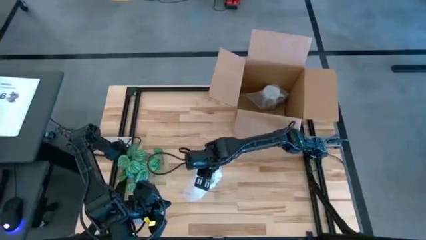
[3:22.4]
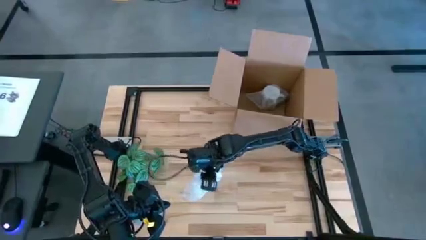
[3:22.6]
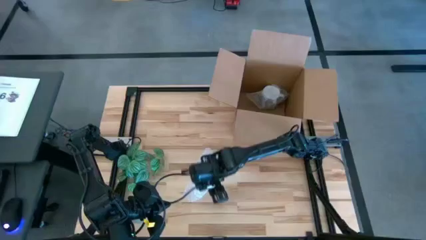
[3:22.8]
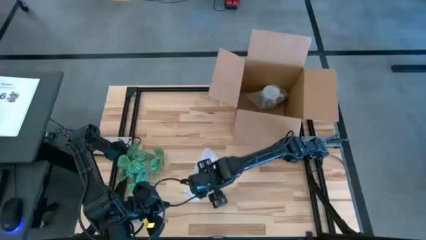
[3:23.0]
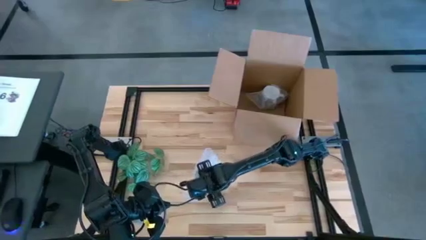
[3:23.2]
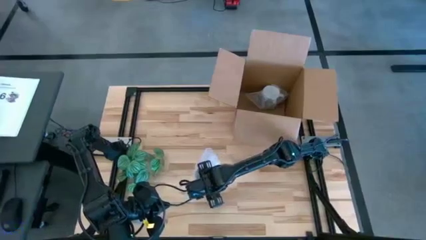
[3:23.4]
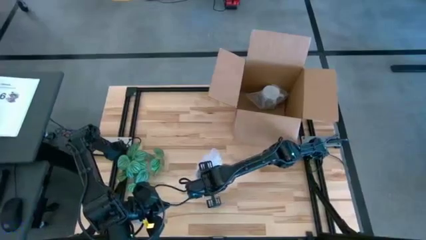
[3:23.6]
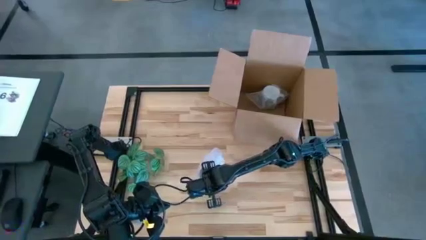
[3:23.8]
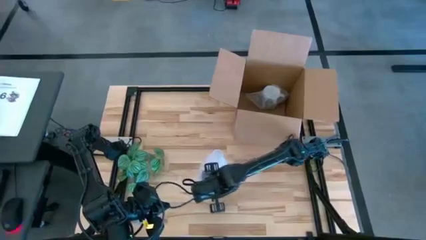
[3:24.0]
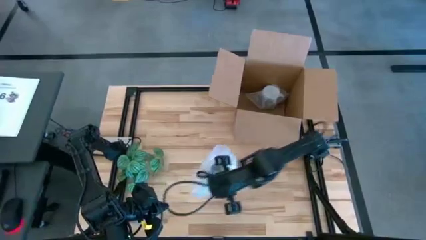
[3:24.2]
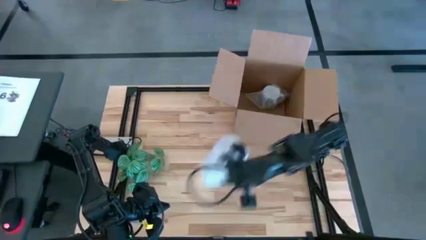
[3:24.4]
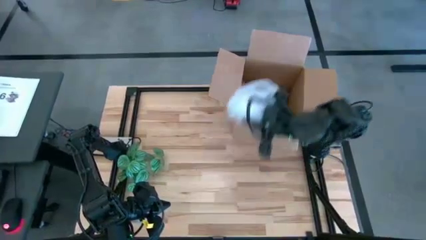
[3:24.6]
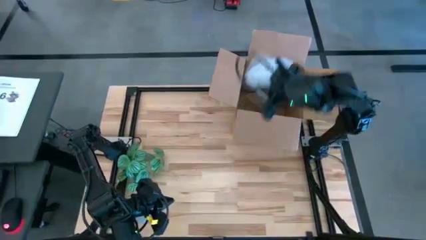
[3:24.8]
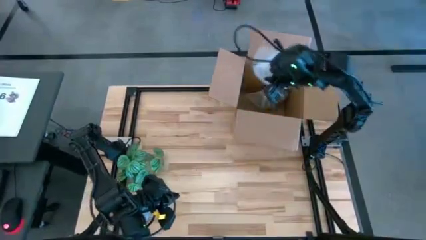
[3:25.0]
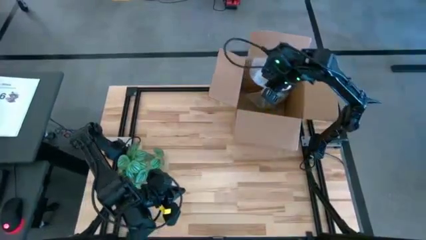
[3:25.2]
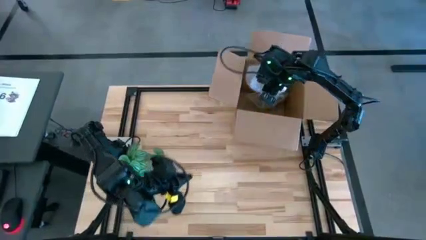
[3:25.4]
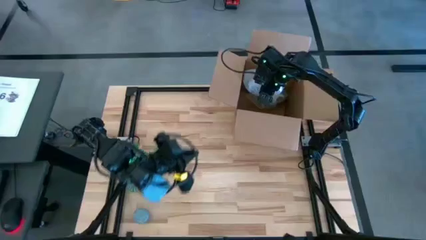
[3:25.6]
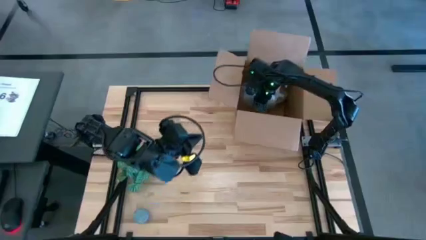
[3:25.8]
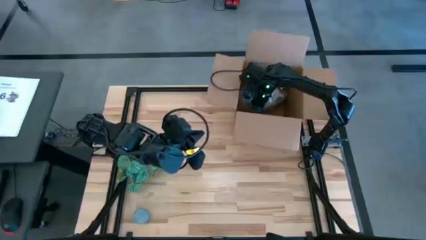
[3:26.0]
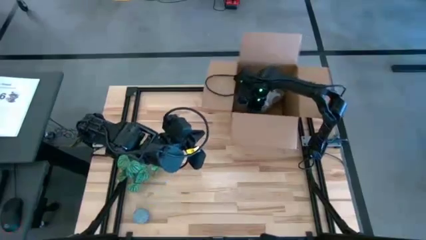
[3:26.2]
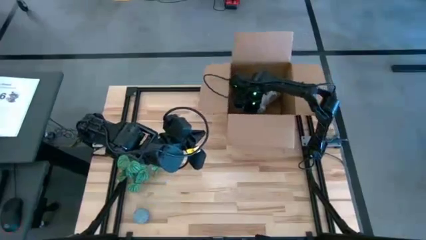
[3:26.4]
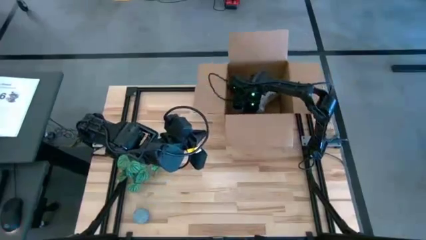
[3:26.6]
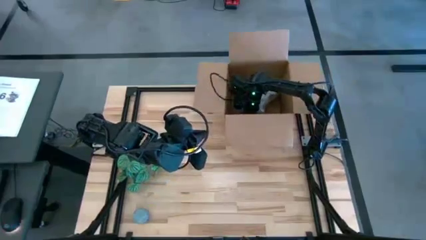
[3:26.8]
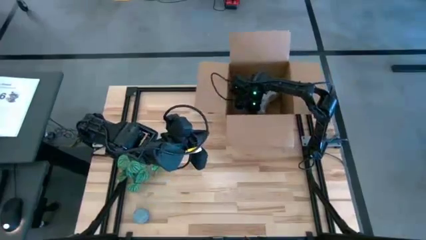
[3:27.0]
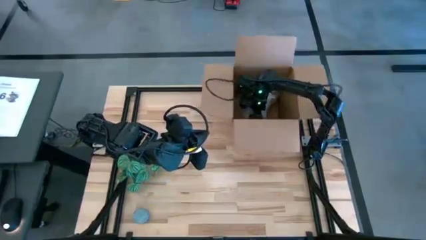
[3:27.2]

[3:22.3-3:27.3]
Task: wrap mug
Put the wrapped blue mug into the cardboard box

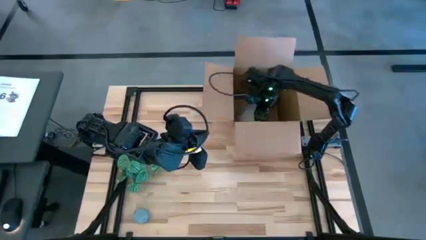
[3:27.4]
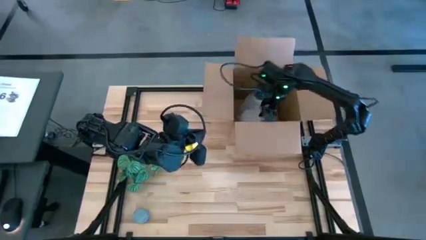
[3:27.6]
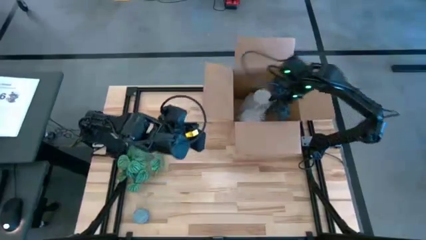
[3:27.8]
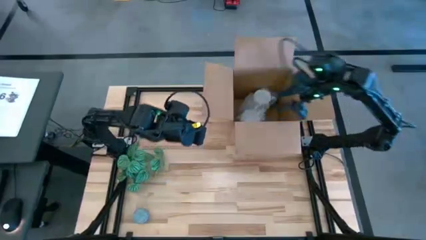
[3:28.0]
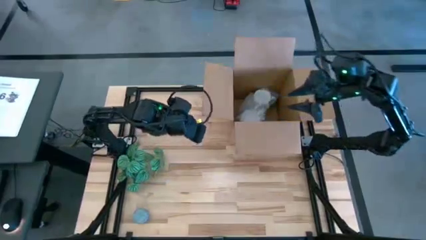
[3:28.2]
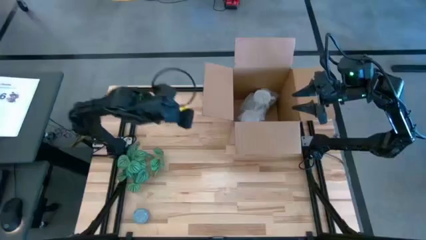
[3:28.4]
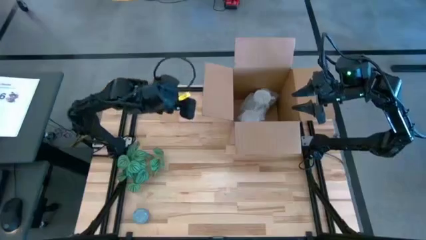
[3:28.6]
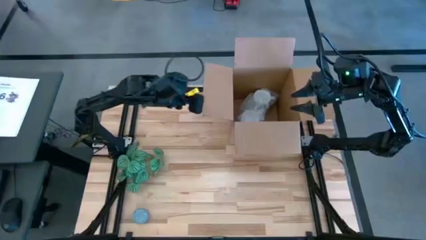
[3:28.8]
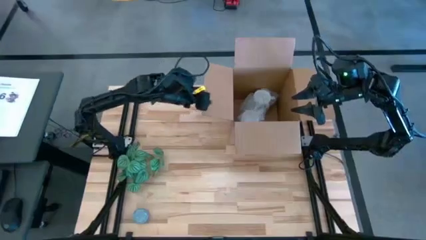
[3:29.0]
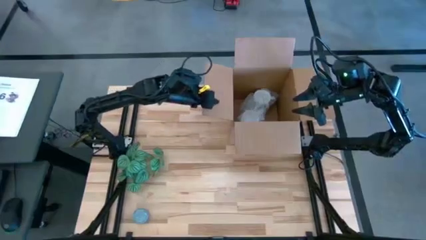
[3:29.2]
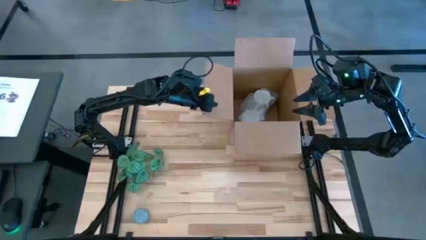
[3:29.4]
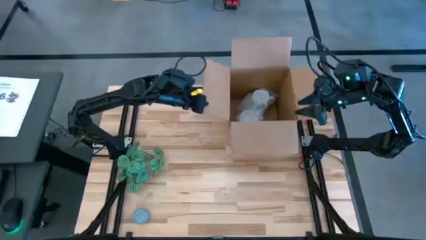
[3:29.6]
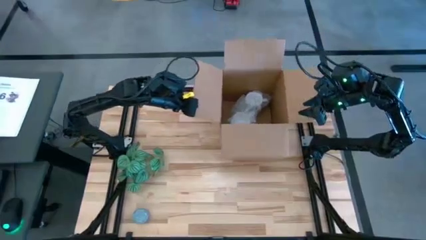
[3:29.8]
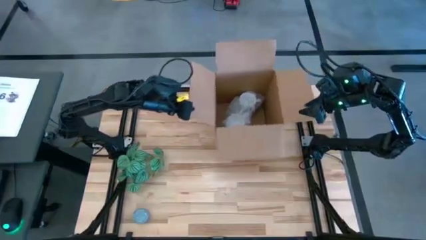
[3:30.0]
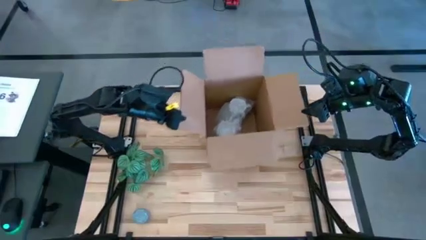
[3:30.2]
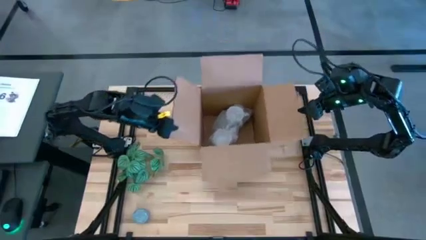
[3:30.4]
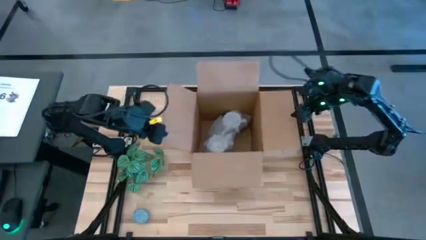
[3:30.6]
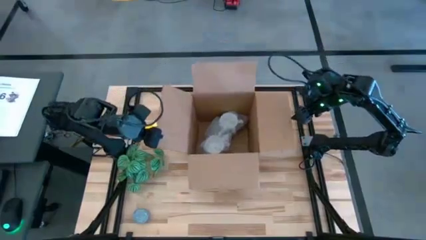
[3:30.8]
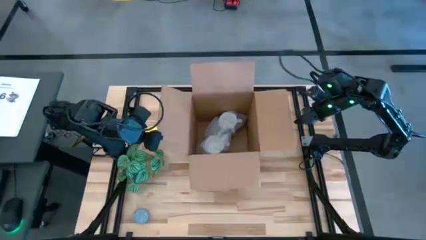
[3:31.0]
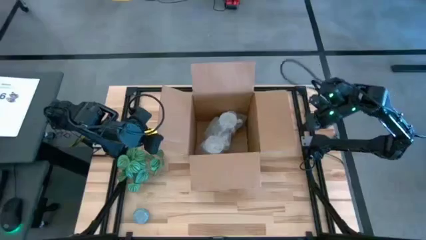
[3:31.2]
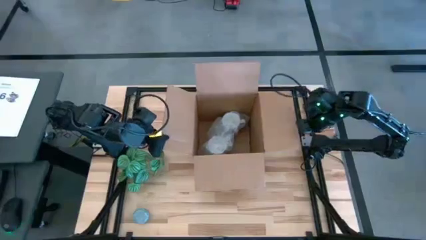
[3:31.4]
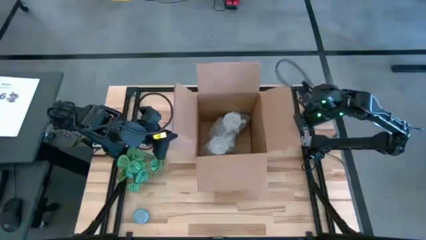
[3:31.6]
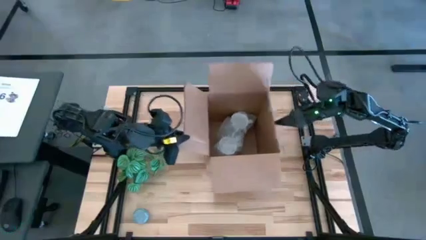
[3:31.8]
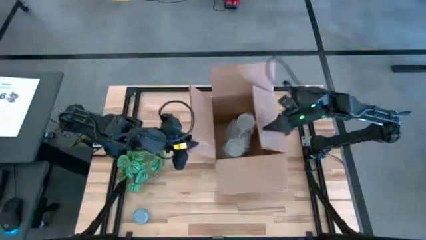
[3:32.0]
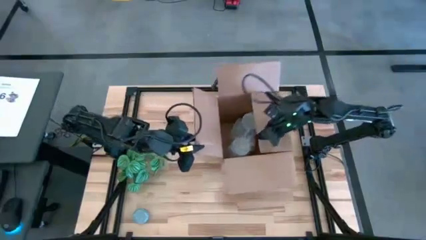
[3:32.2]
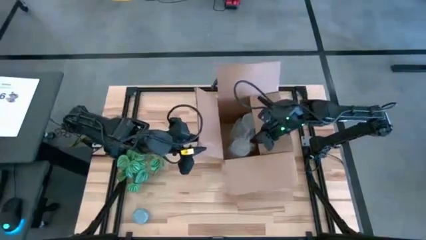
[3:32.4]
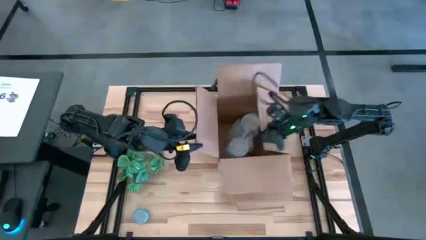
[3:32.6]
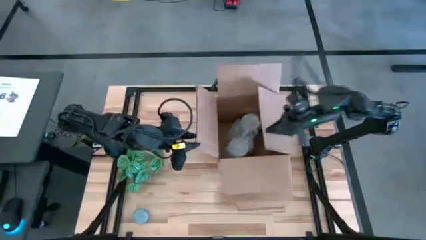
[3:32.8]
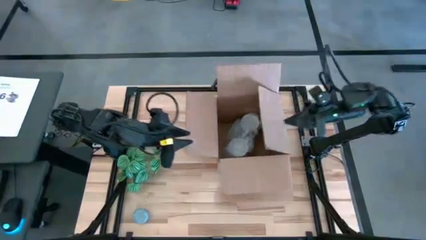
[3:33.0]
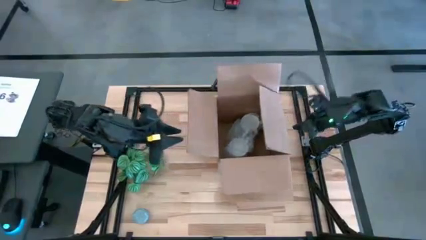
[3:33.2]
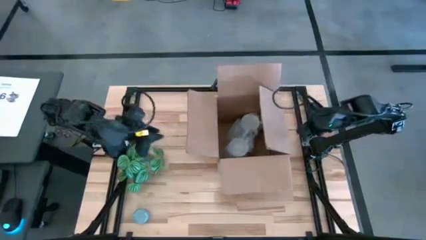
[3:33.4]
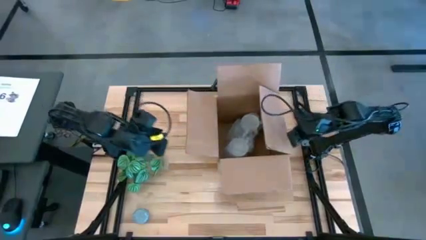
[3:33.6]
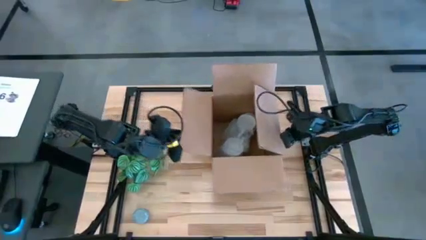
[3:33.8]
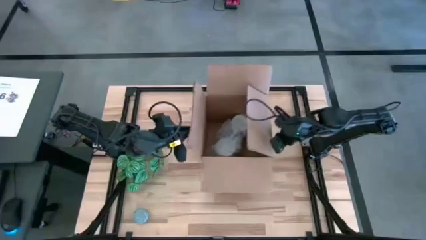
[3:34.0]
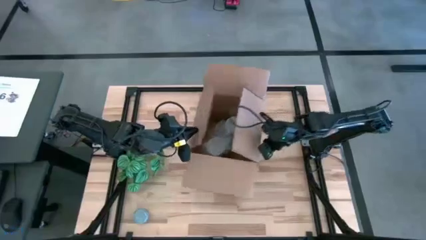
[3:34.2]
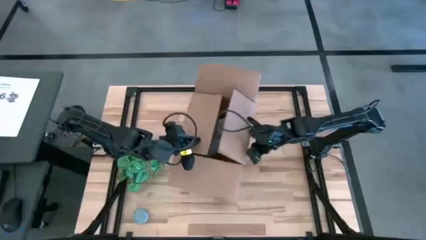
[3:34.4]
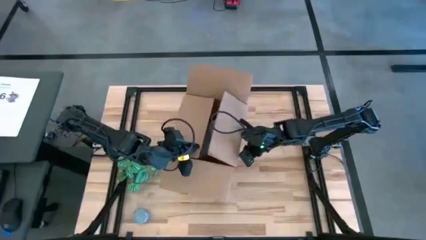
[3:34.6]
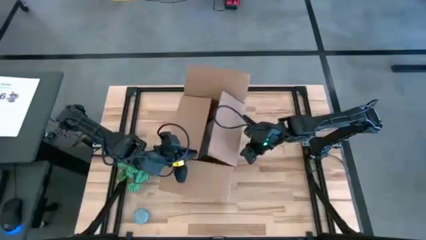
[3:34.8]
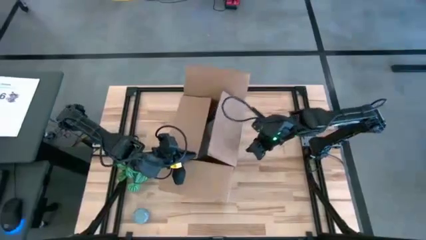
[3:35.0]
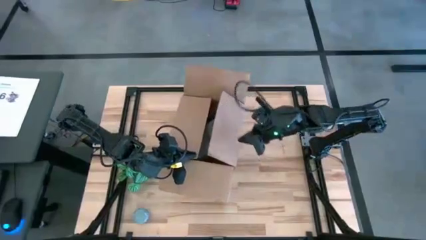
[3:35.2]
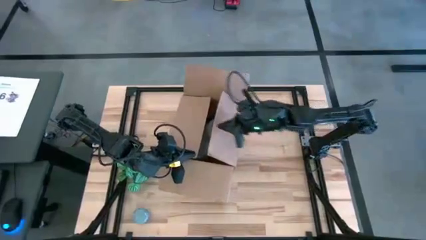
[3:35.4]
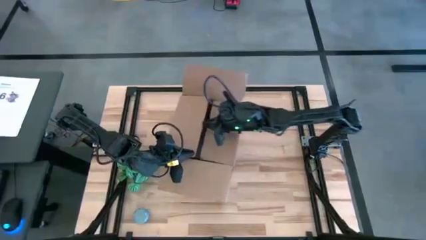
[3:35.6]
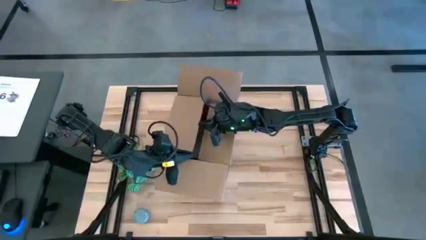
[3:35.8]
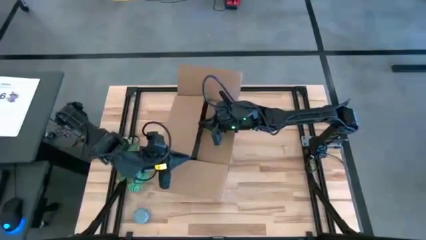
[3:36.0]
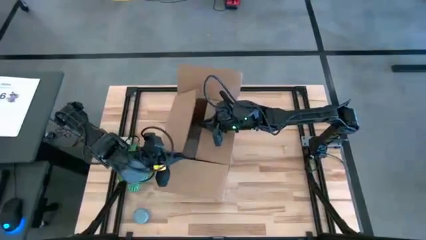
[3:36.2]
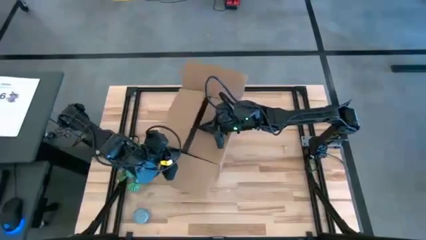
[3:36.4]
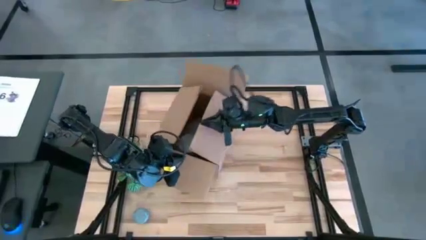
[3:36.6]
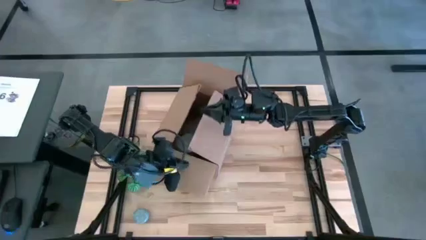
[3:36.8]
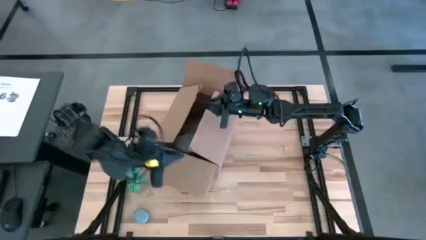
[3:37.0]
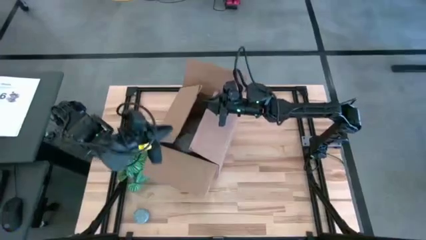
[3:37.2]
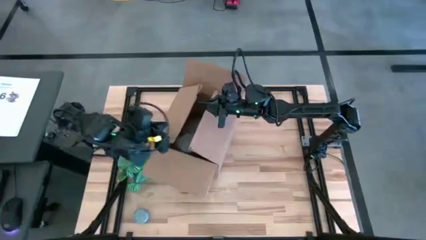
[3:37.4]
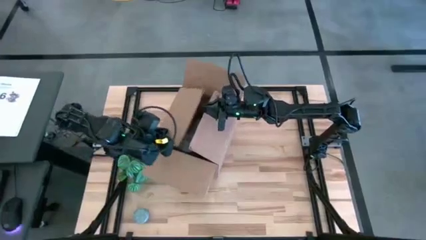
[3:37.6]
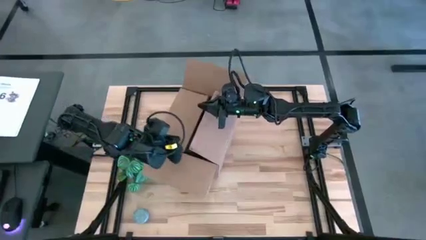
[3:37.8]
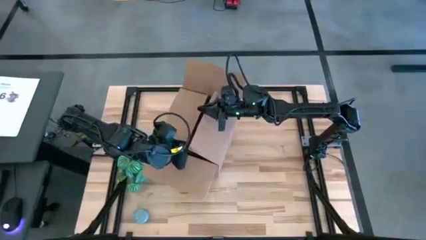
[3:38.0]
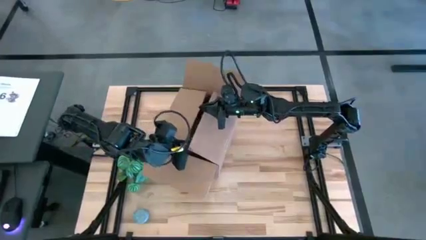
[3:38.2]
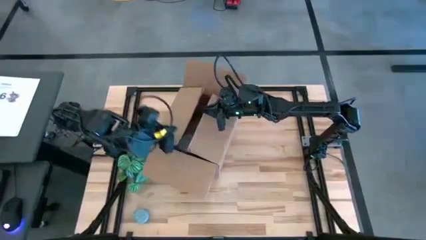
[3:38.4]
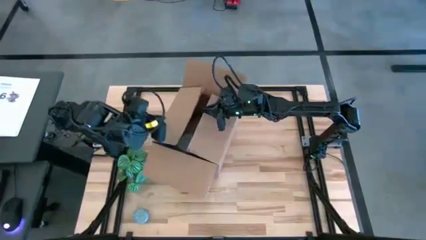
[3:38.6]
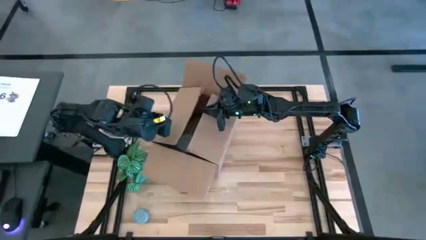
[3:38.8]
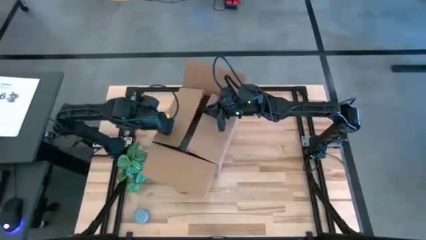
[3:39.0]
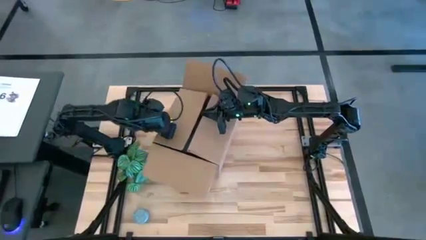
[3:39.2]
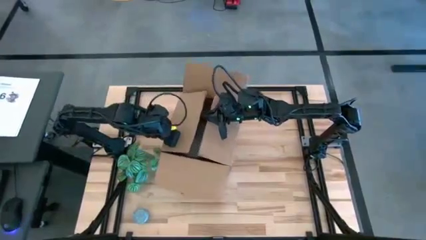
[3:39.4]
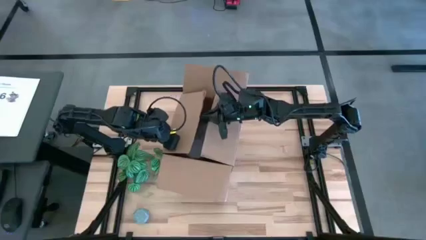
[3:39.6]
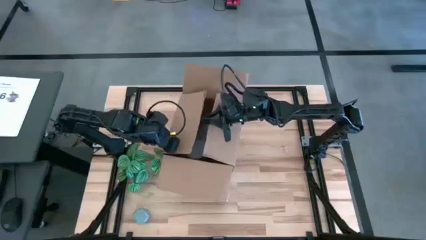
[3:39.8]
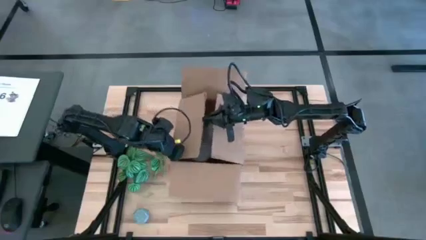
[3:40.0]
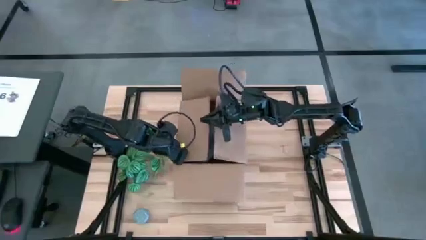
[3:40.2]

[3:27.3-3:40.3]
Close the cardboard box
